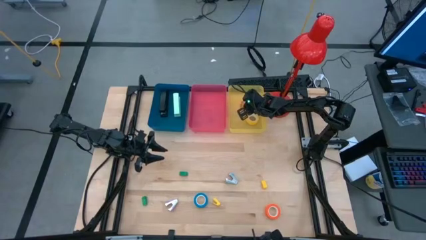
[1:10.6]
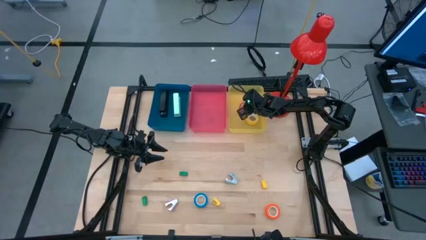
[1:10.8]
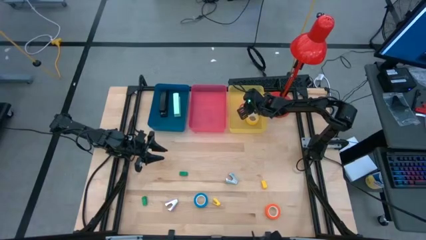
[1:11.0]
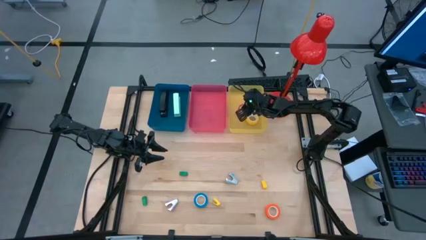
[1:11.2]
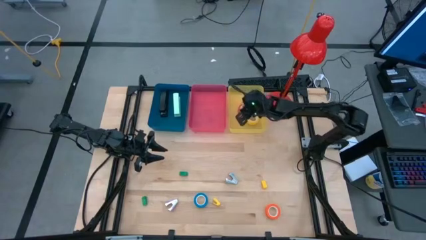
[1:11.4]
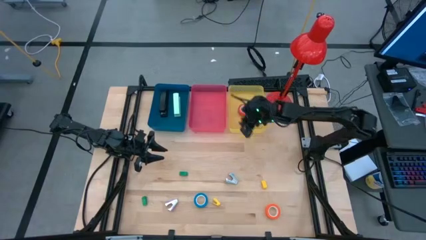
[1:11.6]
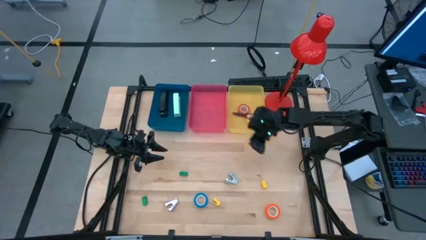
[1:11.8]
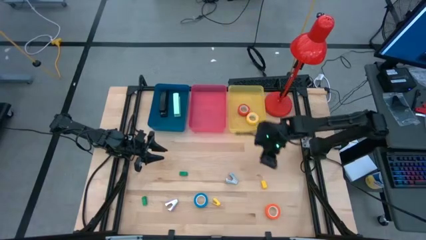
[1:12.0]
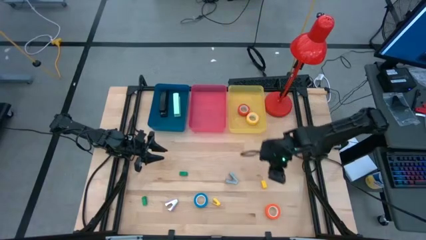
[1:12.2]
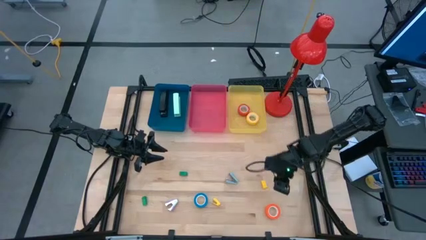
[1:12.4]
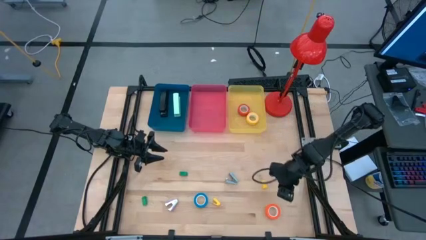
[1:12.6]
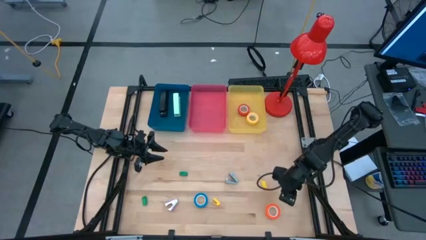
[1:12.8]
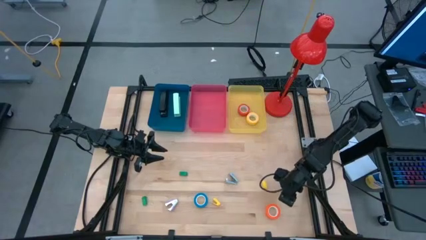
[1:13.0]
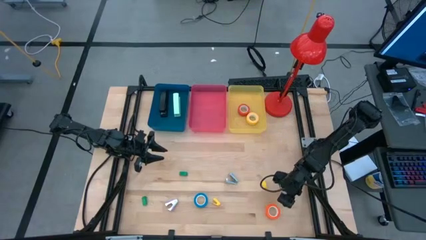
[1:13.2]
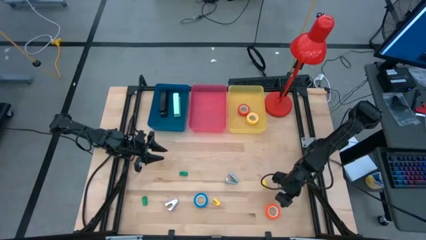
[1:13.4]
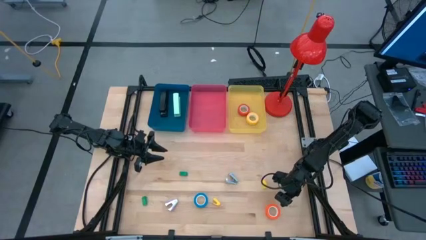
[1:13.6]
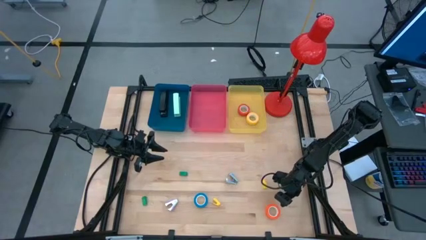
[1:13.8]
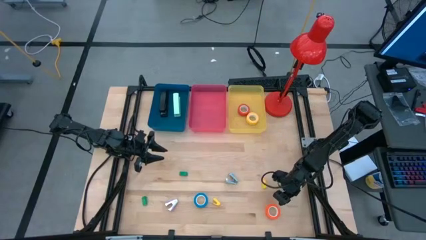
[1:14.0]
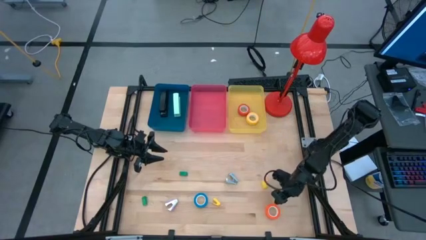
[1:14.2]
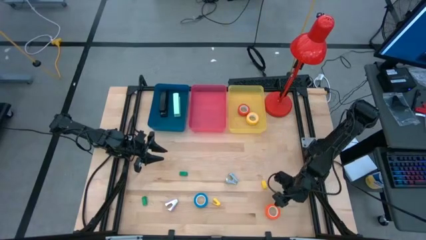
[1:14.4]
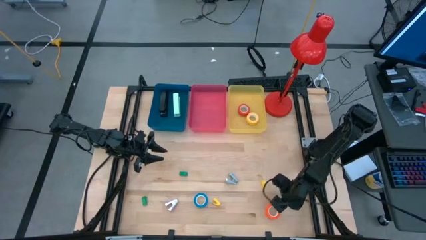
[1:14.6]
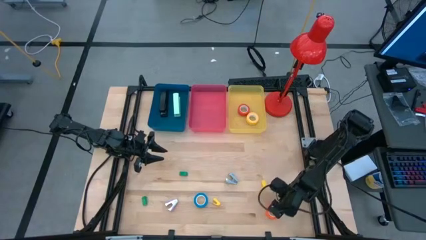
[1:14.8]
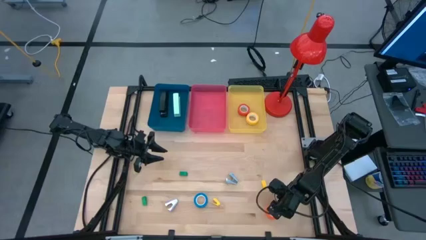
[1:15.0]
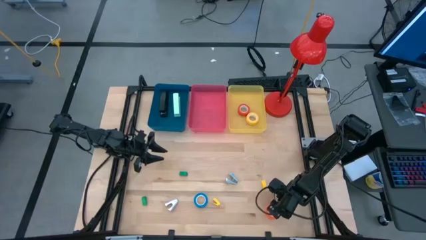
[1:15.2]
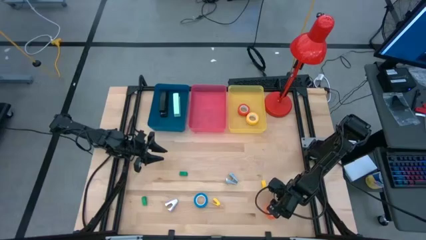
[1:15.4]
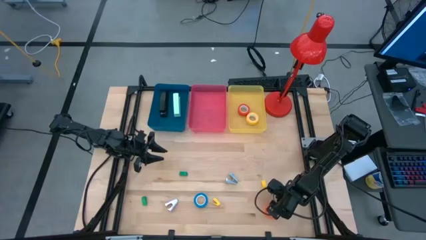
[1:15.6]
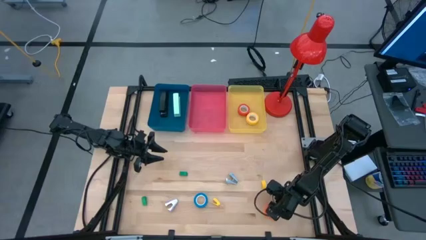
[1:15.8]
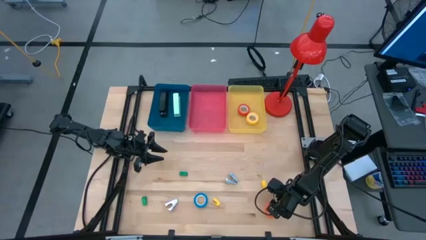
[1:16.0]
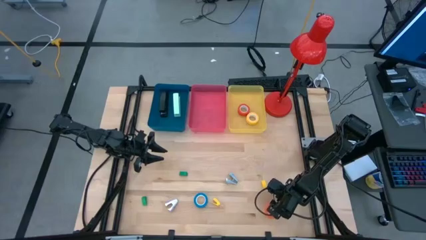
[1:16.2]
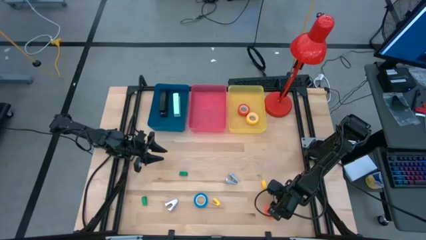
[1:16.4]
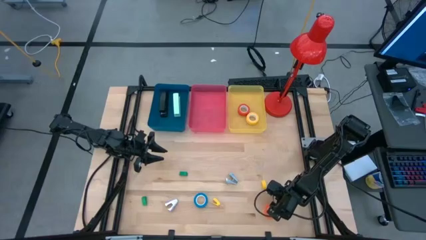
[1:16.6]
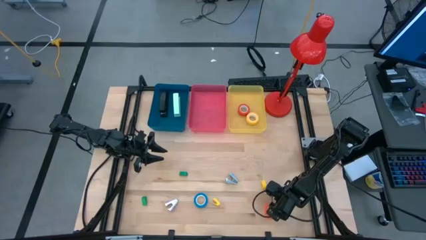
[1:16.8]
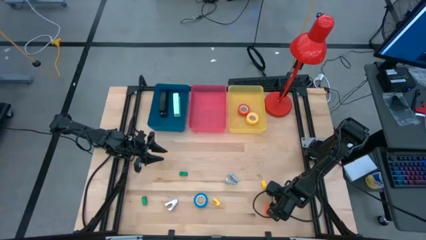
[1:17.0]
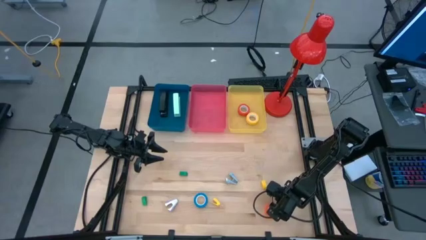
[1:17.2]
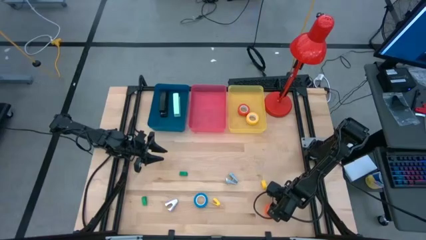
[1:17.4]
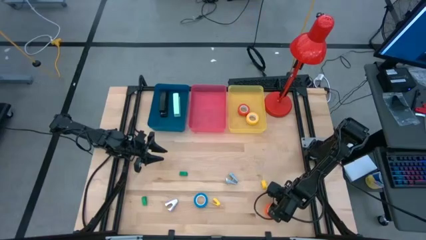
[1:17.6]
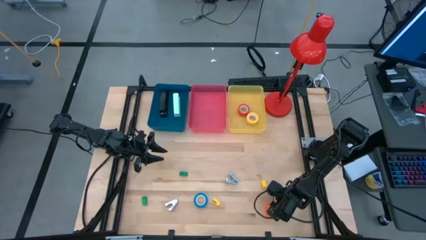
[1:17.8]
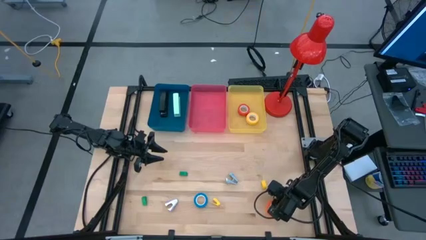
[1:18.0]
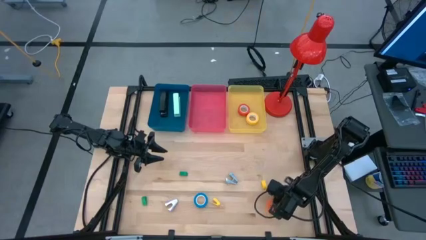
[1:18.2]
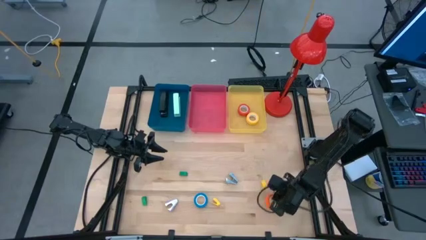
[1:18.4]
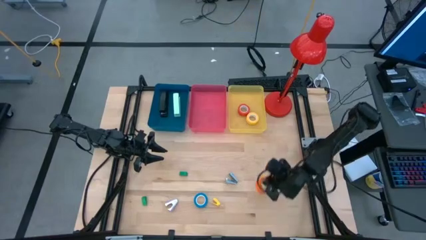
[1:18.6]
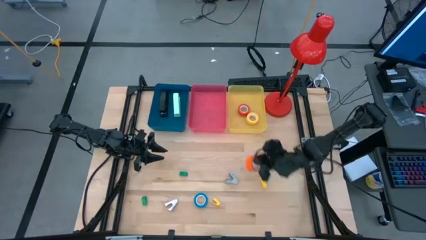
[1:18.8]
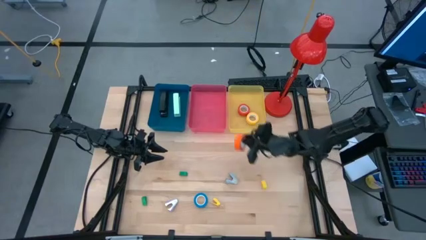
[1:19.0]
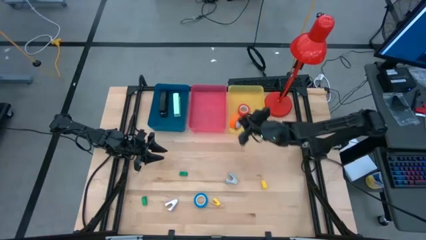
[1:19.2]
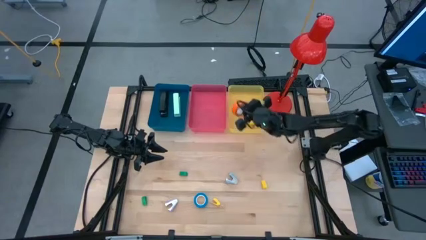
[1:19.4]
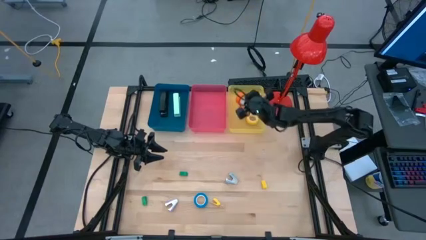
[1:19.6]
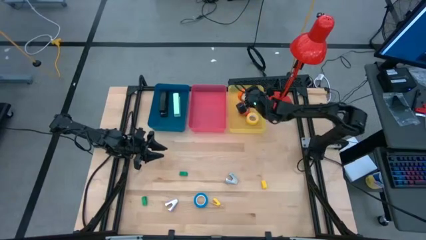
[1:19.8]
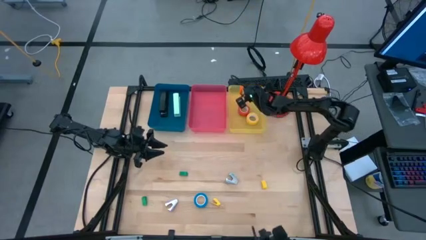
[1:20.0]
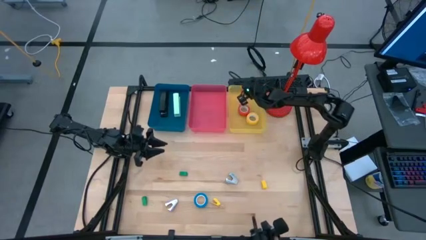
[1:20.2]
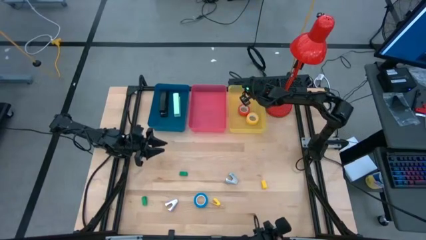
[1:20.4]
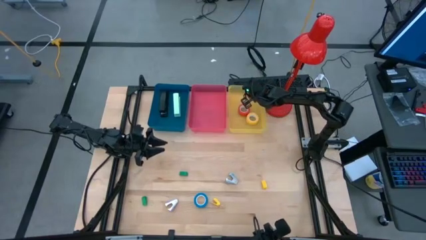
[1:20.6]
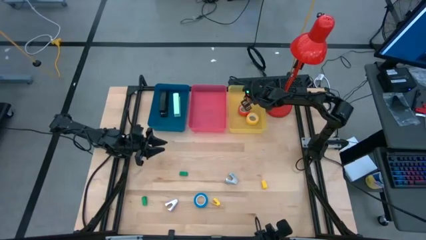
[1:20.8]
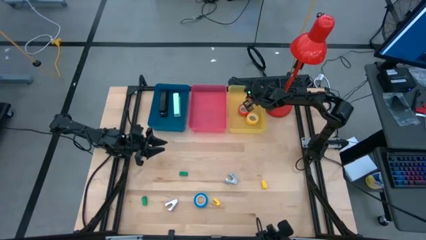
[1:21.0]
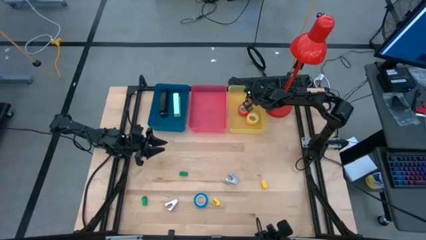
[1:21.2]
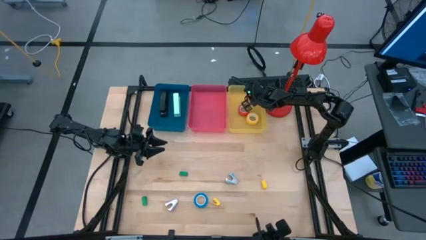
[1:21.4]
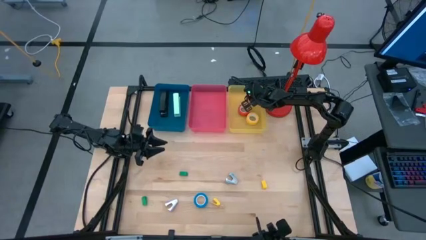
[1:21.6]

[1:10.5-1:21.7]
Task: Pick and place Stapler, Stapler remover, tape
Put the orange tape into the yellow bin
